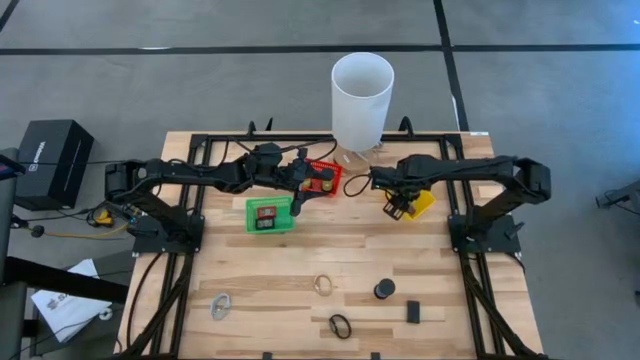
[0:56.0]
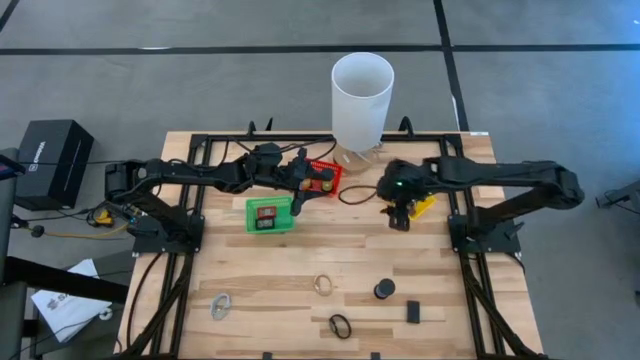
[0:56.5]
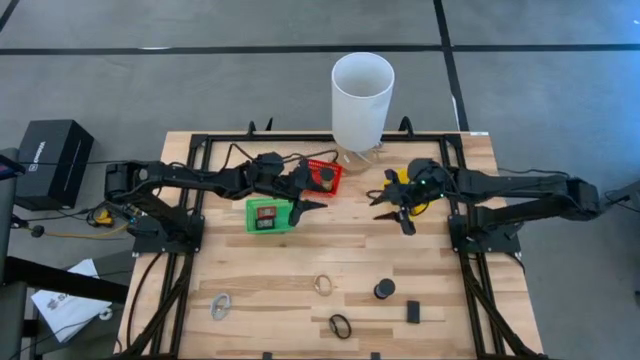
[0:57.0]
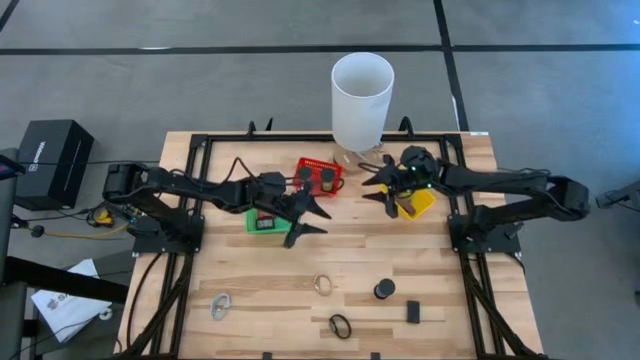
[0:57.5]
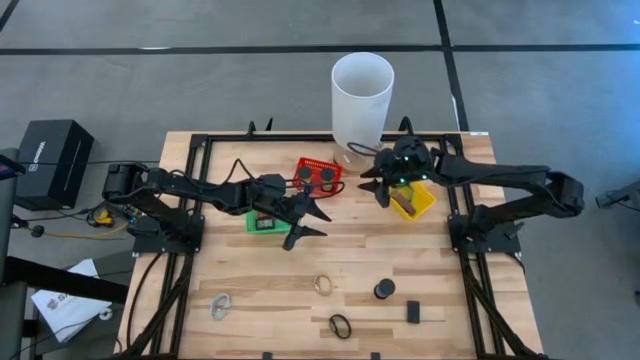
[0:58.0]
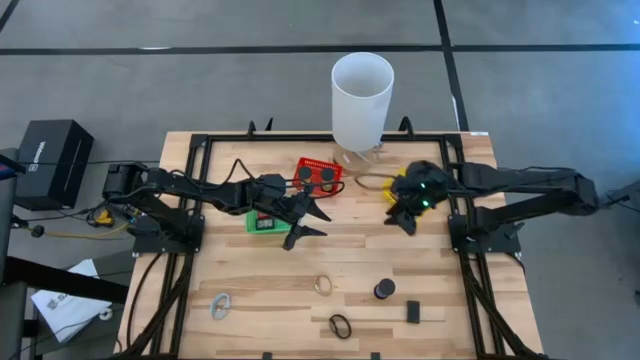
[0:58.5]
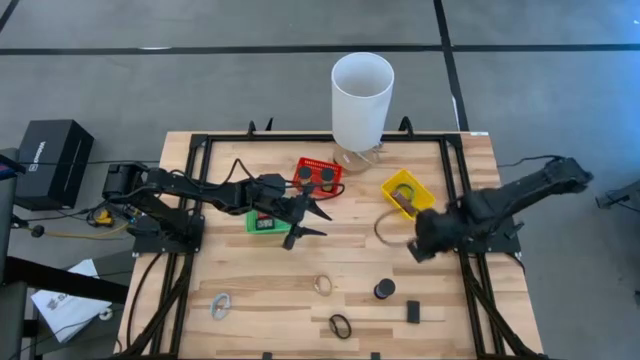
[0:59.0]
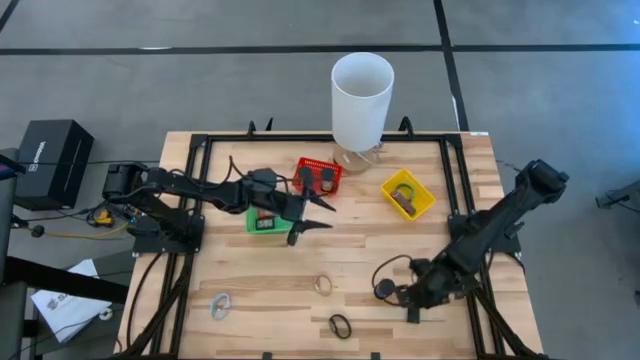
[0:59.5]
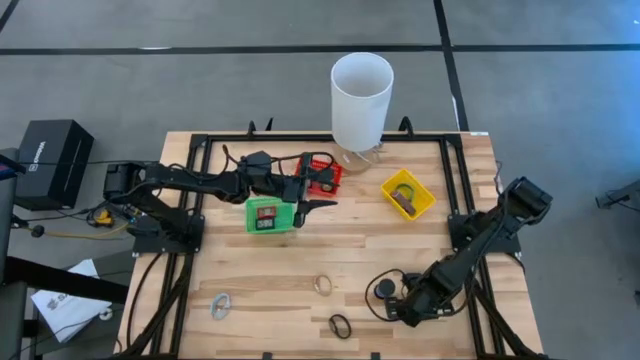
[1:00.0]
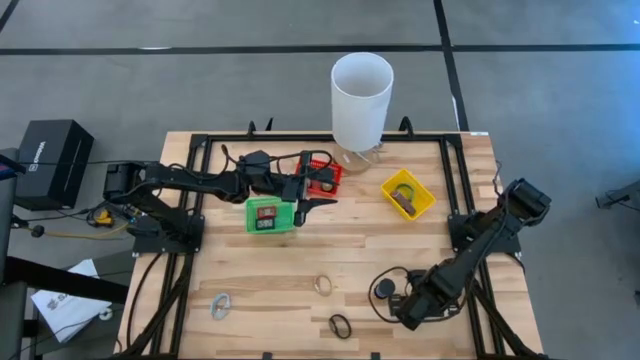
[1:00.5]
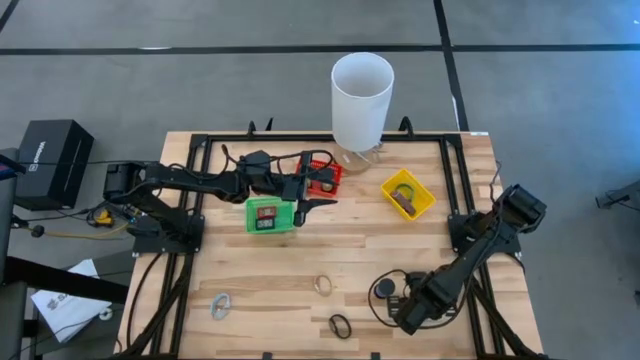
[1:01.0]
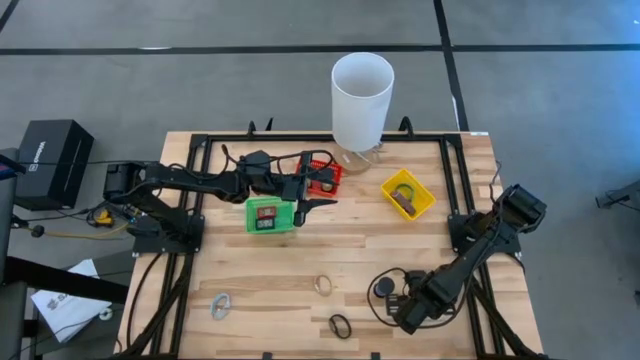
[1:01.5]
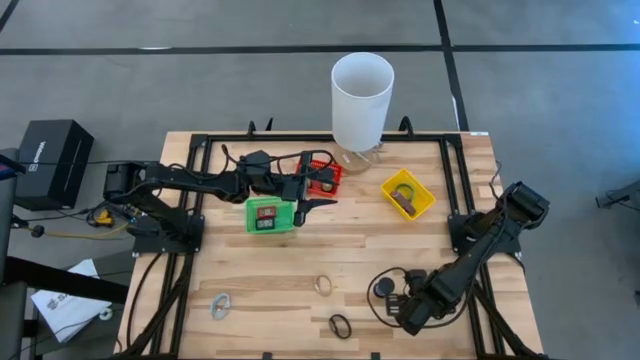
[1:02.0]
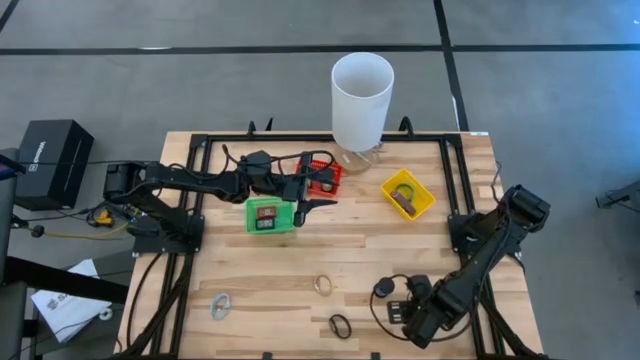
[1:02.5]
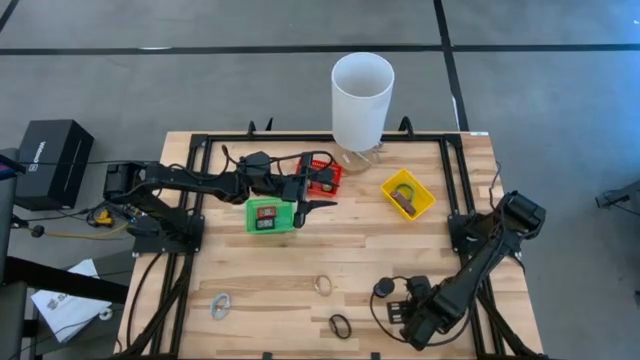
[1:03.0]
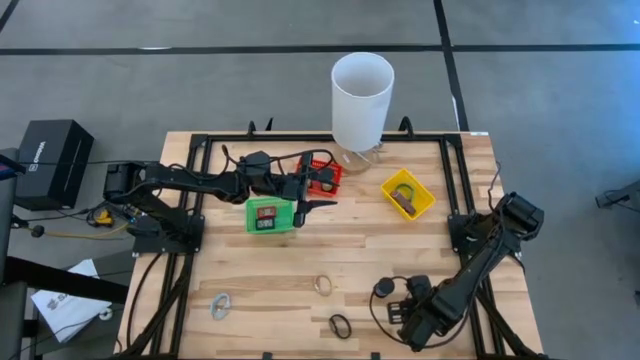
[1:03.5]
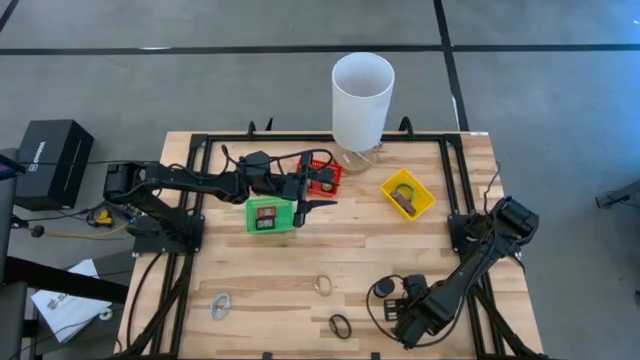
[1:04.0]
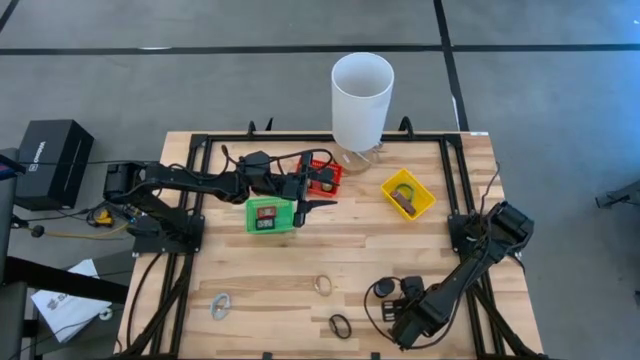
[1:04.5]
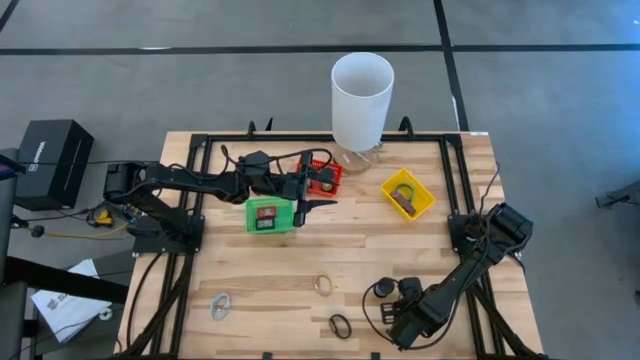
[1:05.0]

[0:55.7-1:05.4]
Task: Pick & Place Office items
Put the black digital timer into the green bin

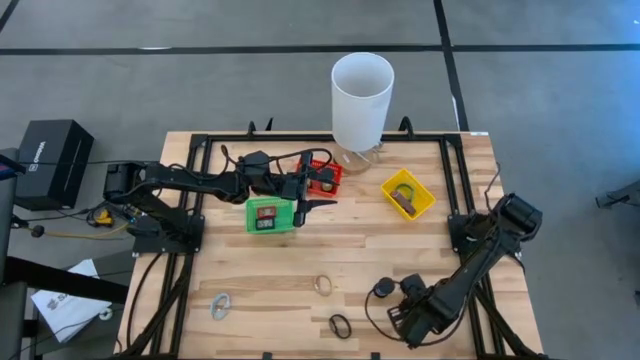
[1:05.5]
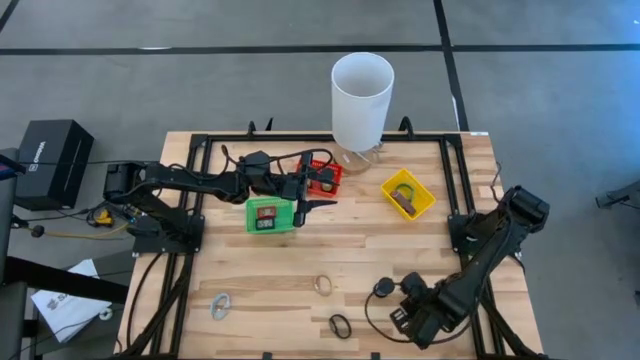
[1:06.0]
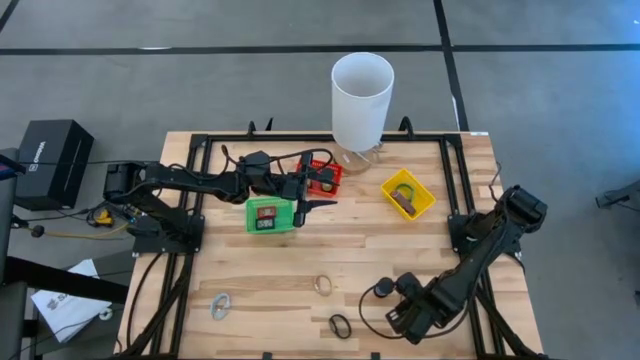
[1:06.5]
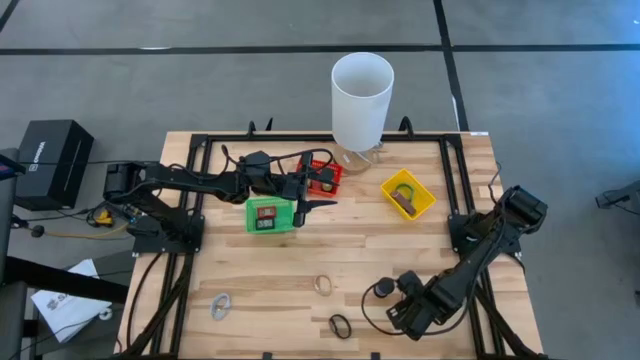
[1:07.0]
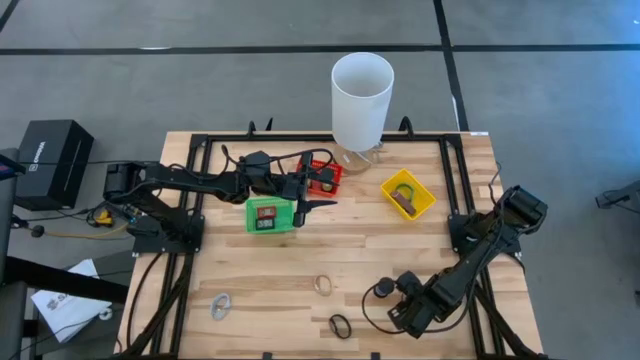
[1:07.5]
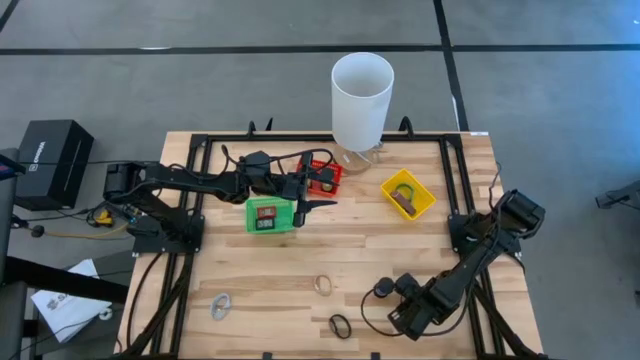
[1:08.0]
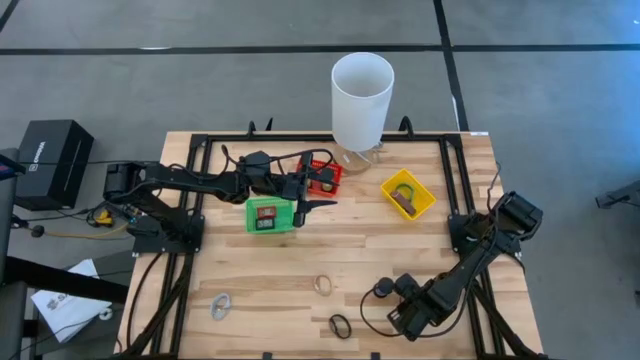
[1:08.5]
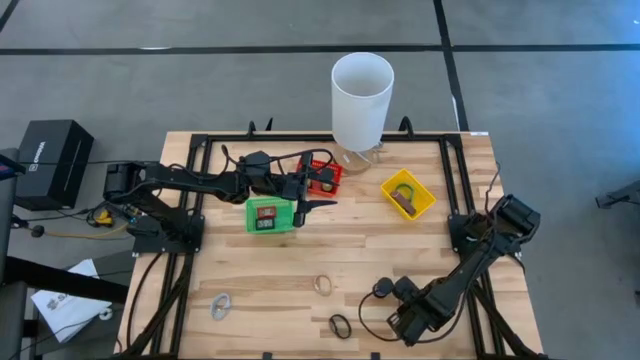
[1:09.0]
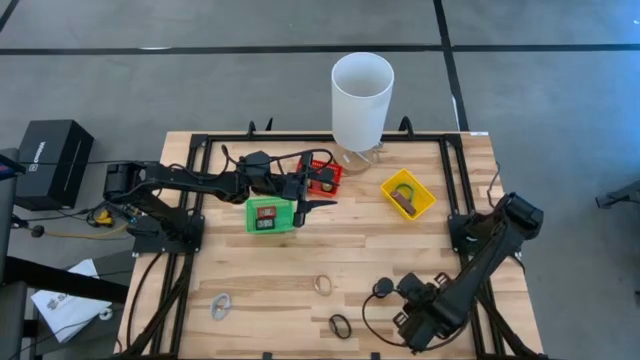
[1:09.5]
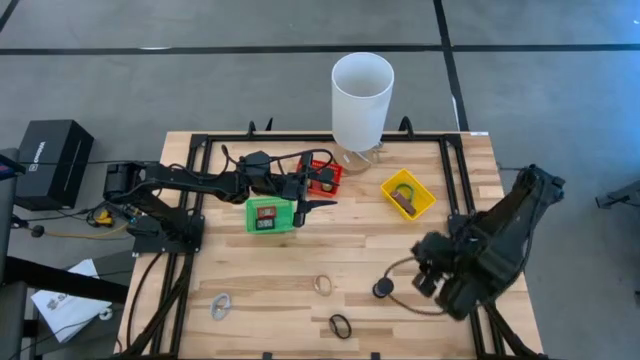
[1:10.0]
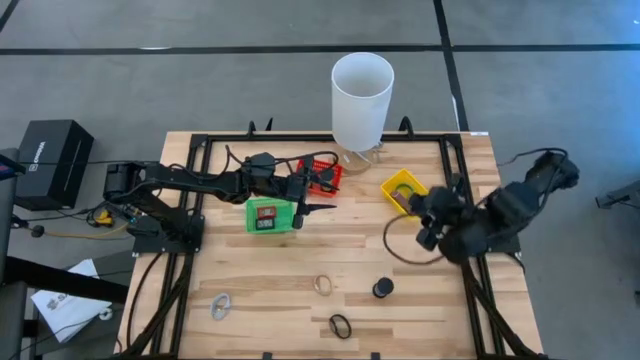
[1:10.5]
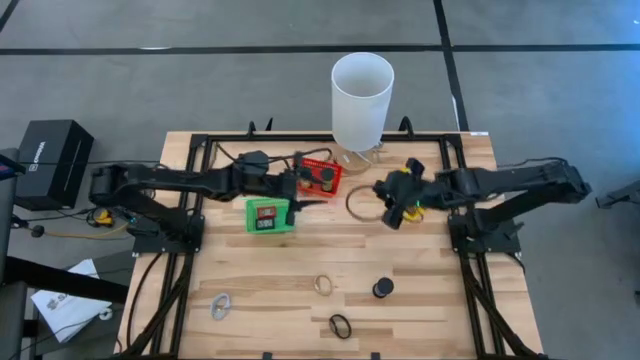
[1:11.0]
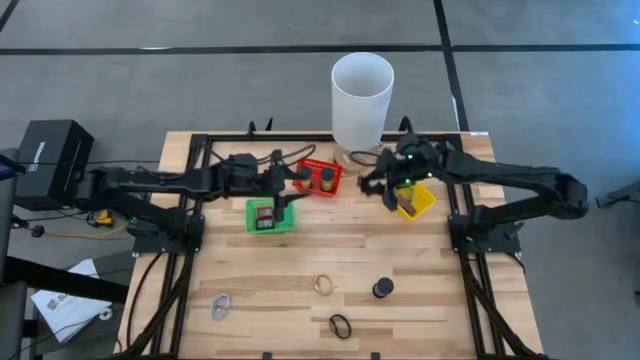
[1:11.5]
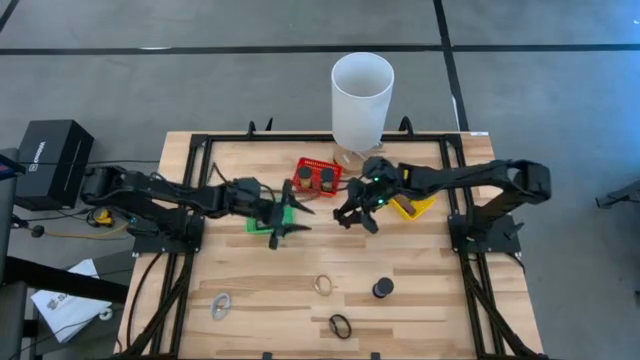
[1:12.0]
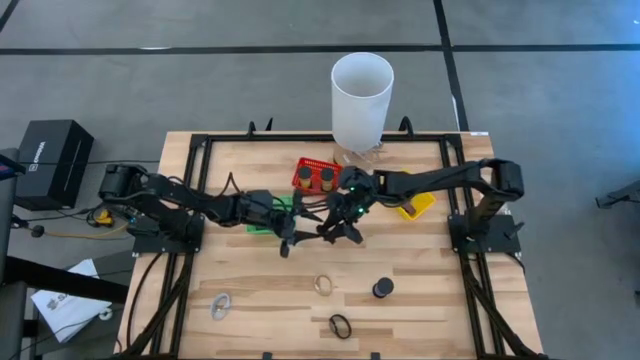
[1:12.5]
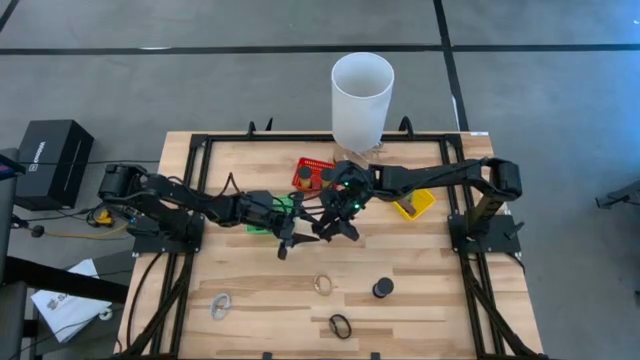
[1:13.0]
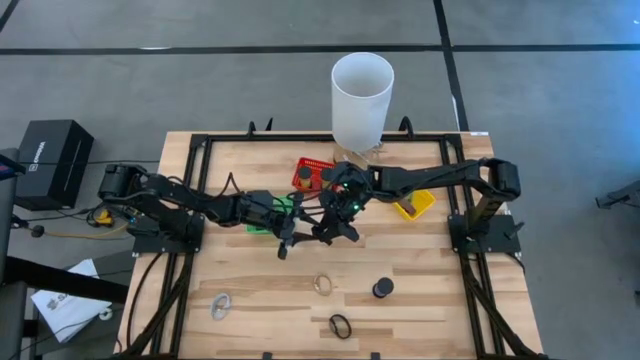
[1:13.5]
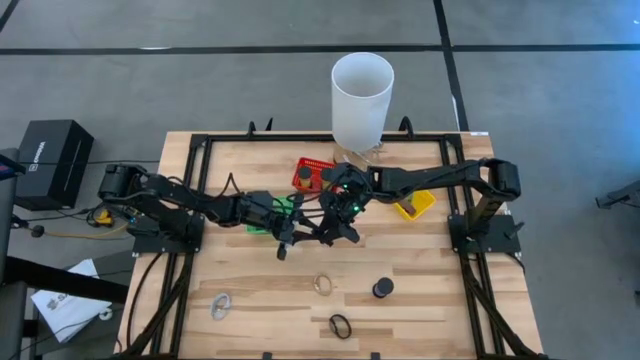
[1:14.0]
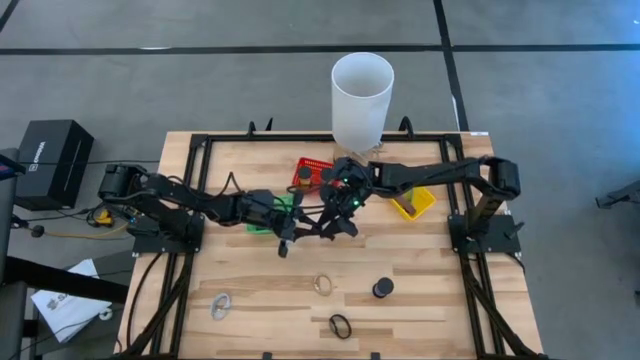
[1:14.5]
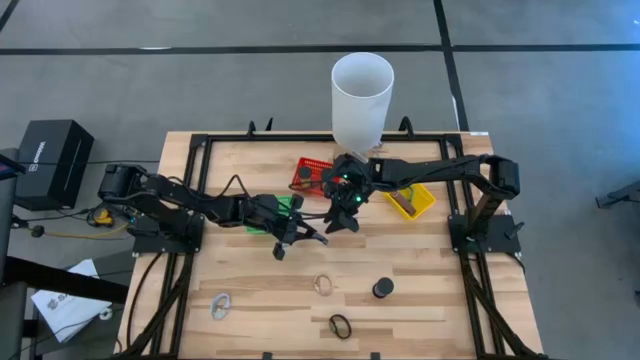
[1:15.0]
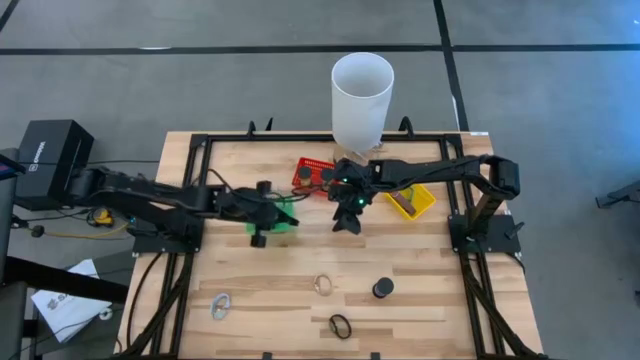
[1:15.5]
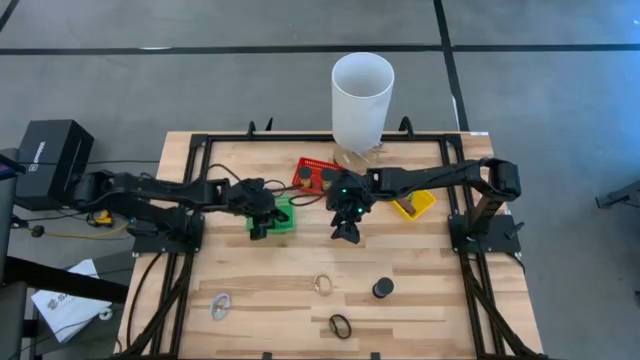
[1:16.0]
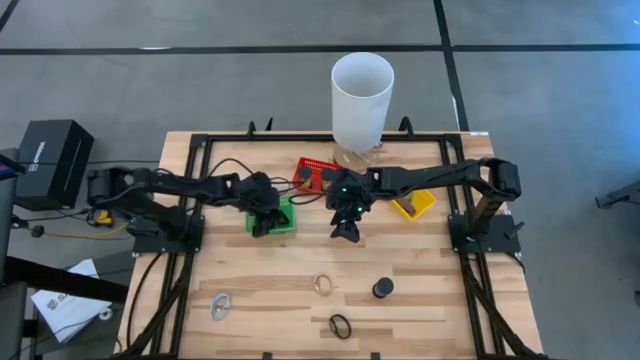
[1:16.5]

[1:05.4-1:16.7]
Put the black digital timer into the green bin

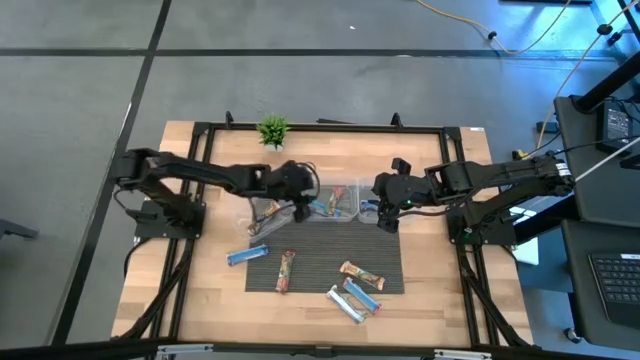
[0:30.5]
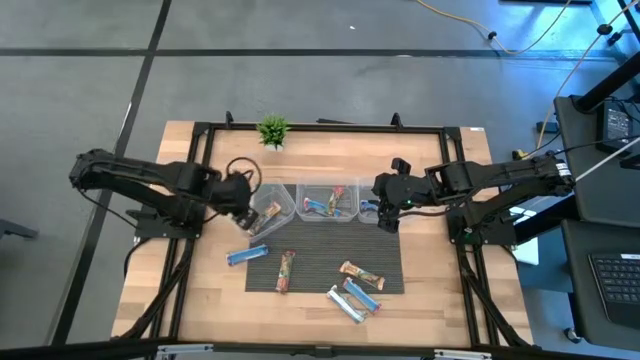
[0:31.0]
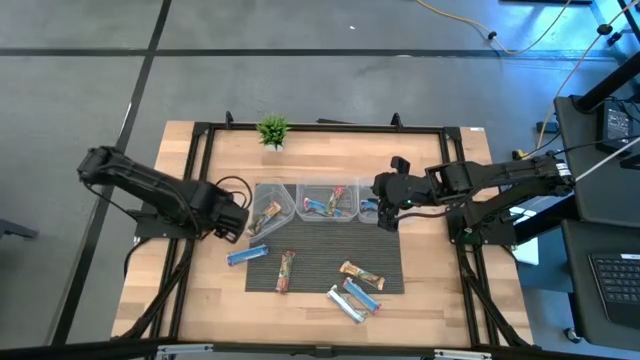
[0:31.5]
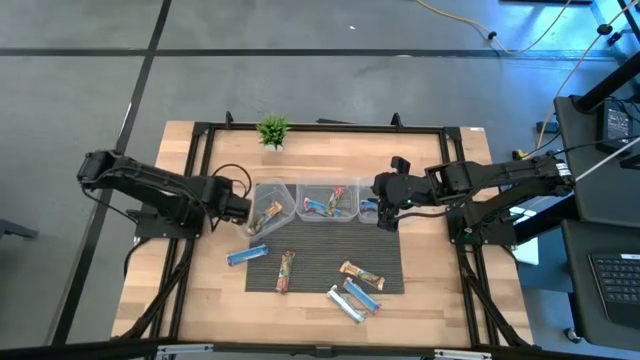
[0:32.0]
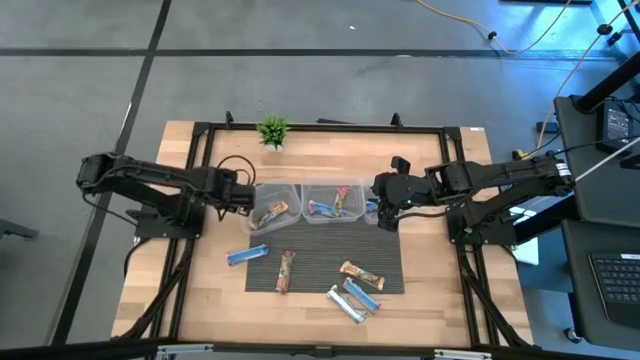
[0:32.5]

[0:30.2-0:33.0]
Task: Pick and place Granola Bars by type
Adjust the left transparent bin
